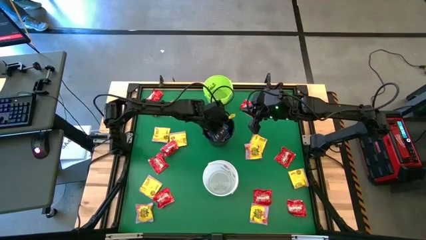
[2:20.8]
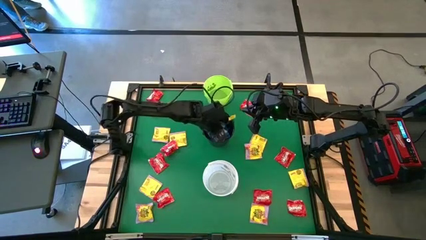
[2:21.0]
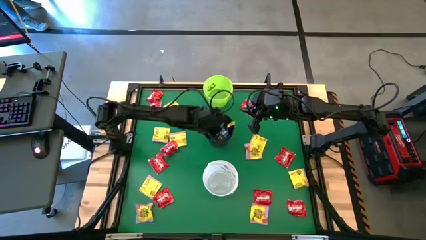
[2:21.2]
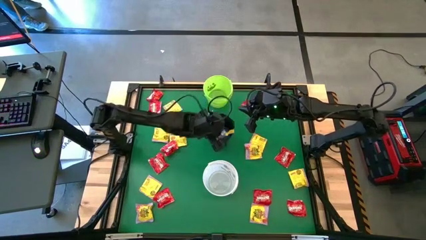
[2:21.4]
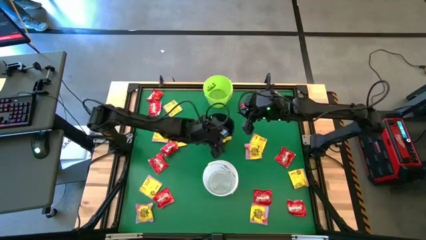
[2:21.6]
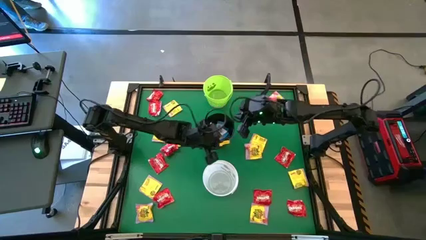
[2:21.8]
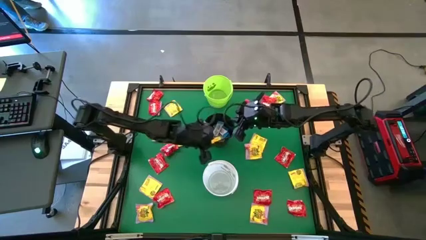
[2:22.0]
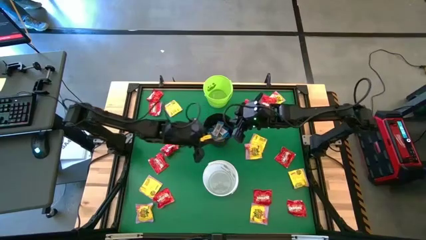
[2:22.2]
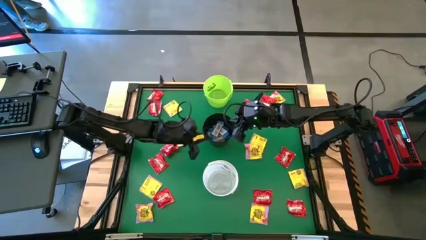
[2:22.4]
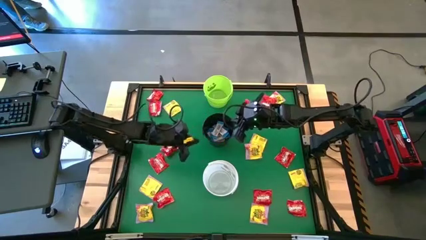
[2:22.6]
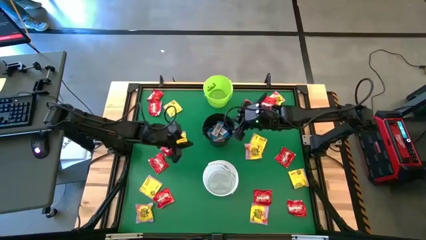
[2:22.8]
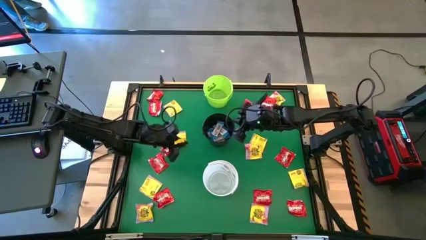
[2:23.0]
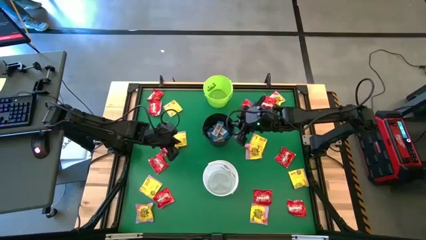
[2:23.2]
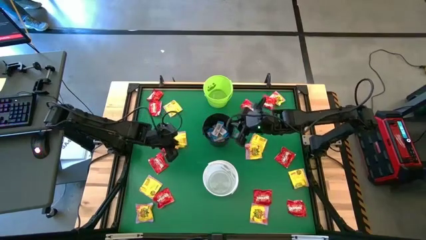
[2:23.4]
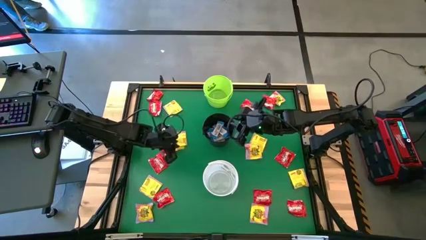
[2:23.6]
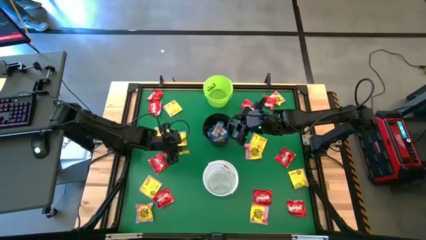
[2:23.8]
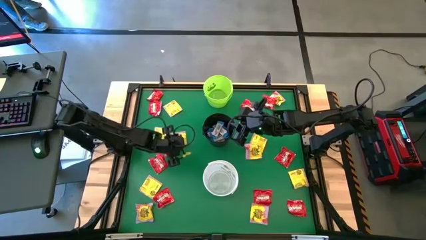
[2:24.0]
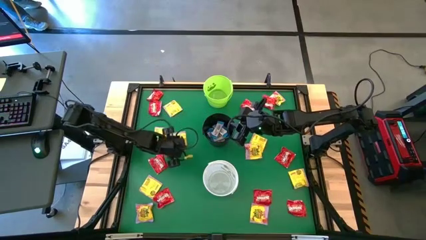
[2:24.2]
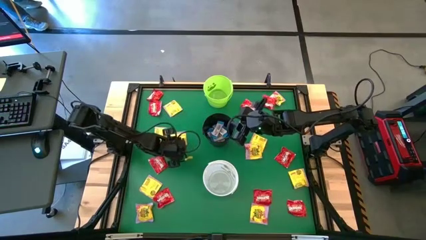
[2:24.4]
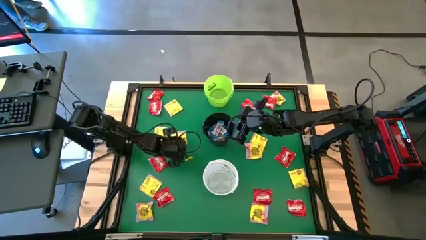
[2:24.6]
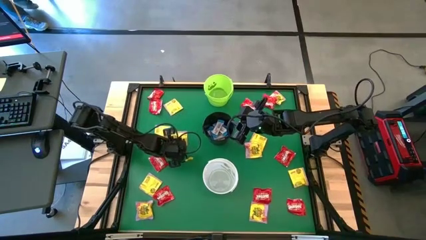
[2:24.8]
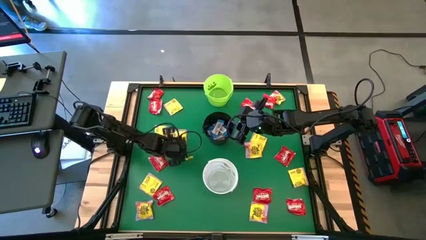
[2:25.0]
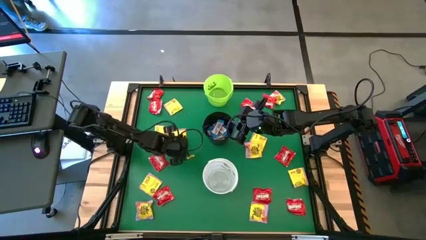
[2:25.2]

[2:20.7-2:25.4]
Task: Sort candy by brand, put in halloween buckets
Put the yellow candy into the white bucket

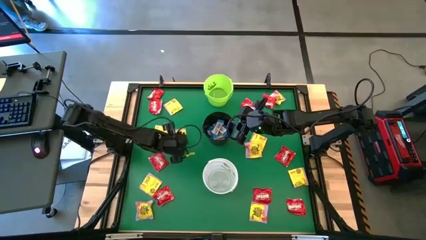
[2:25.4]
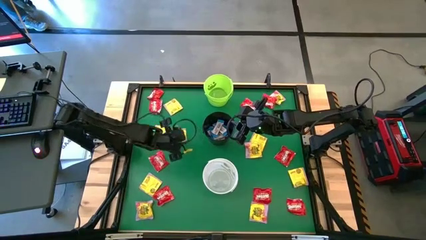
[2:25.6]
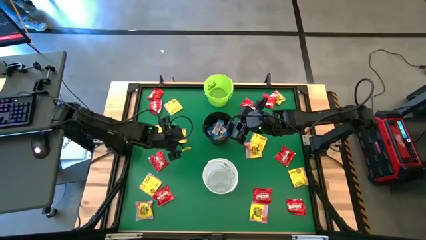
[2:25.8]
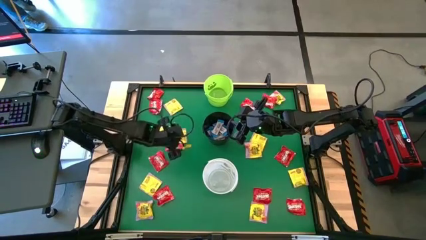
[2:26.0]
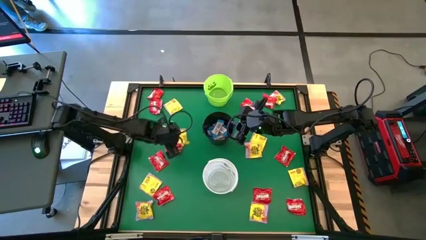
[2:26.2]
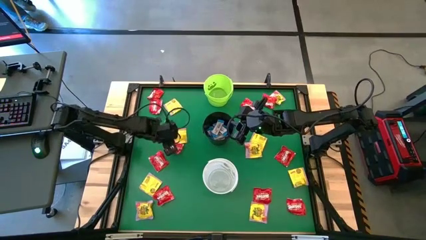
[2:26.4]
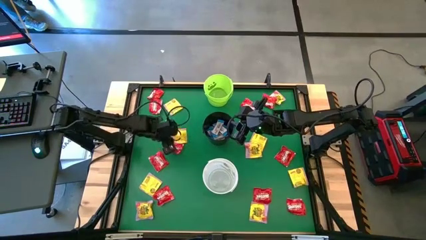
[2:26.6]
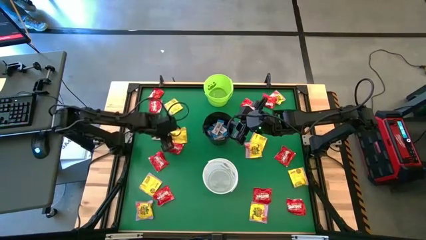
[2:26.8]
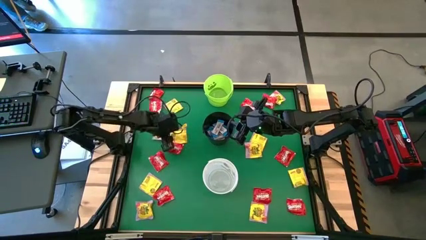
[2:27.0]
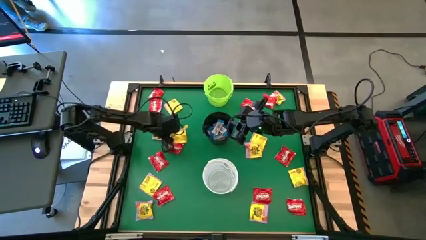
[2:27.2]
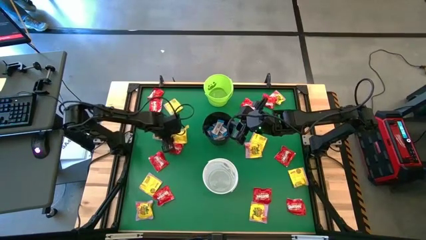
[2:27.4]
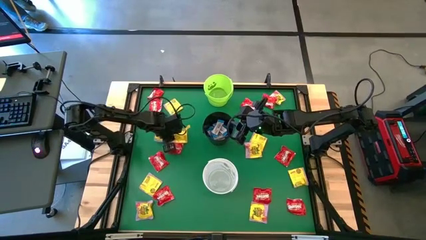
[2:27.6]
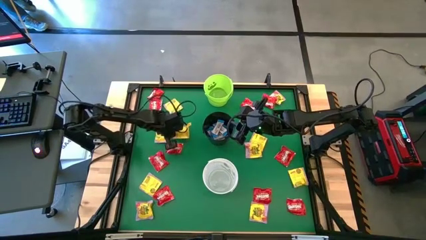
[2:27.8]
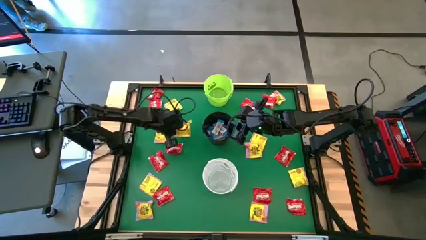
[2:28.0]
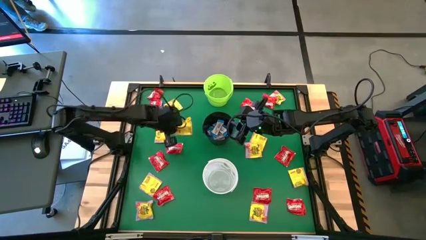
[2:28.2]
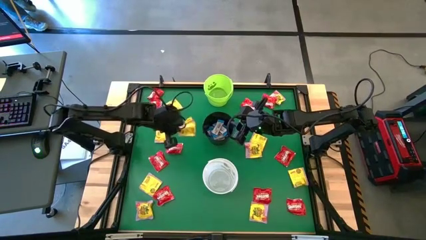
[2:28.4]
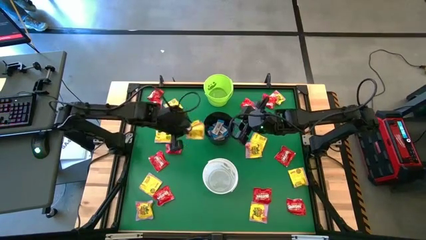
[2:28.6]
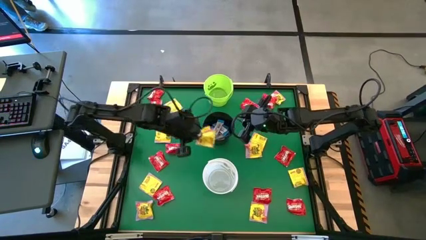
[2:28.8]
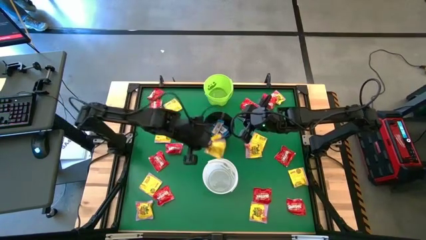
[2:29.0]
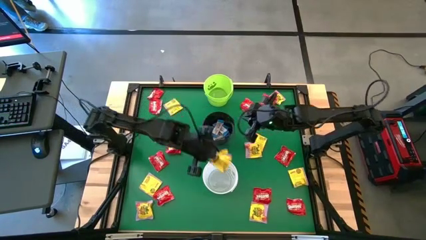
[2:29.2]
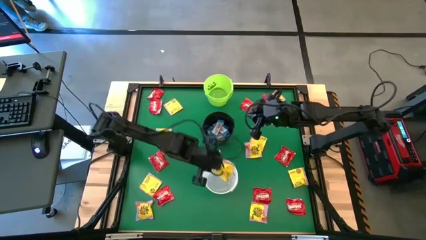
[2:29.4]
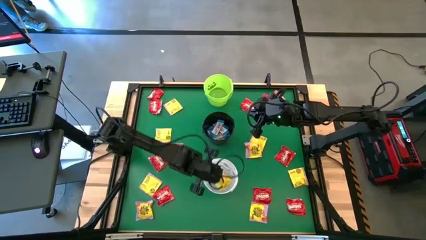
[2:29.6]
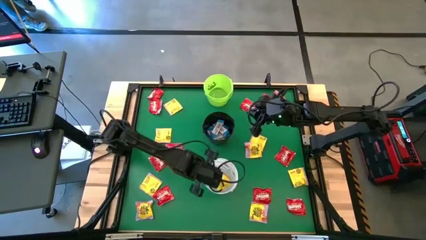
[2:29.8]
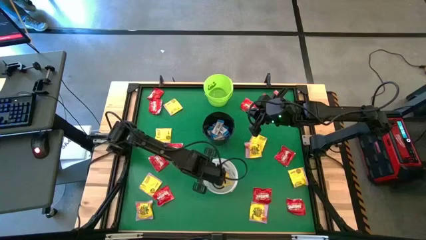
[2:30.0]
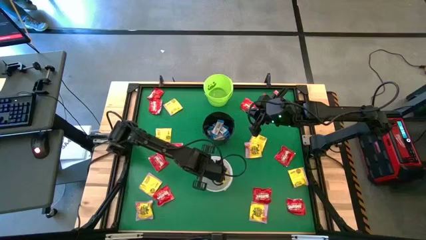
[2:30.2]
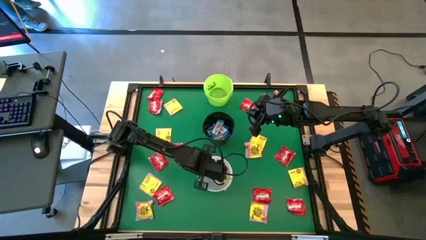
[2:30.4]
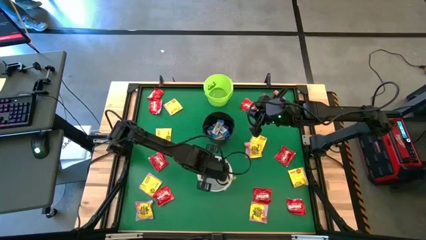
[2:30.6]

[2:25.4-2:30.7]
Put the yellow candy into the white bucket

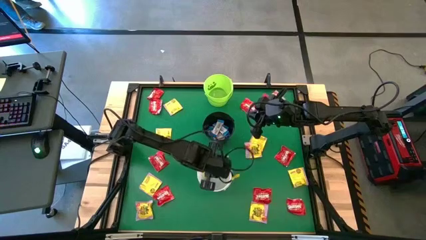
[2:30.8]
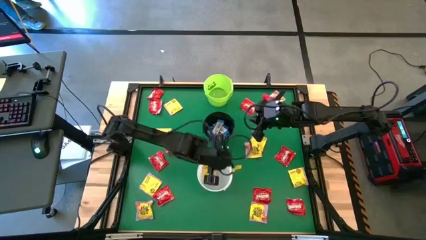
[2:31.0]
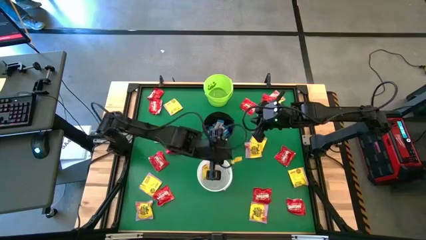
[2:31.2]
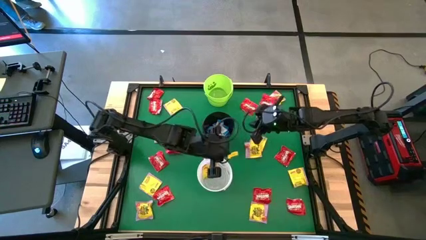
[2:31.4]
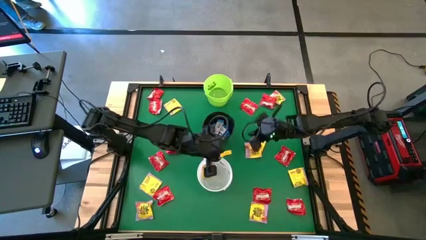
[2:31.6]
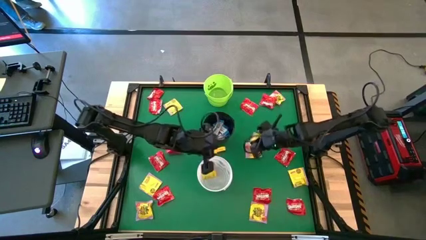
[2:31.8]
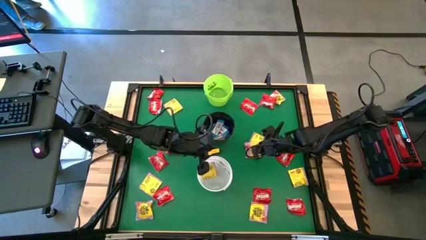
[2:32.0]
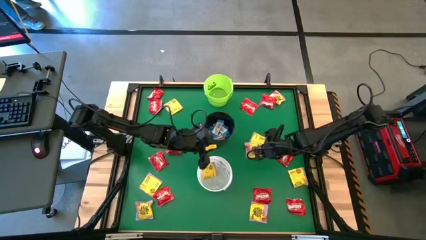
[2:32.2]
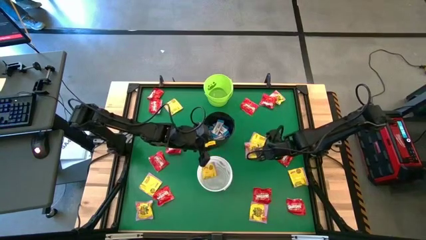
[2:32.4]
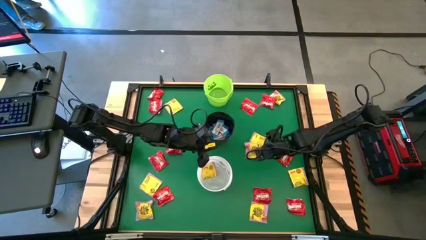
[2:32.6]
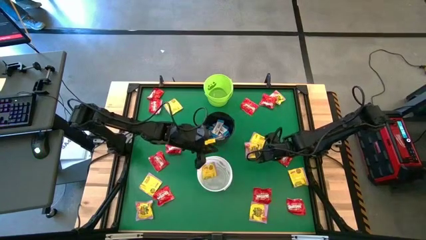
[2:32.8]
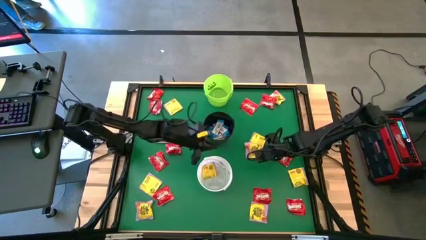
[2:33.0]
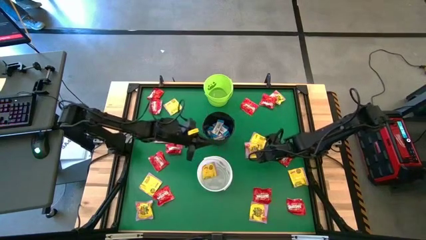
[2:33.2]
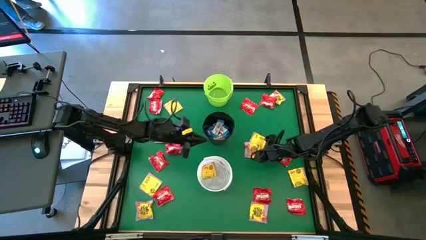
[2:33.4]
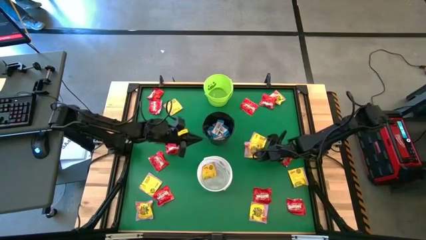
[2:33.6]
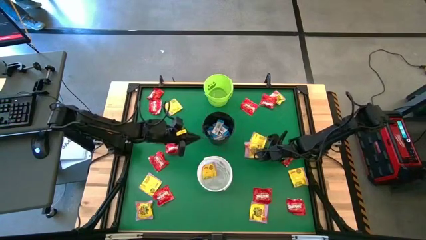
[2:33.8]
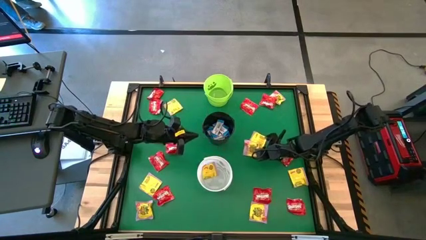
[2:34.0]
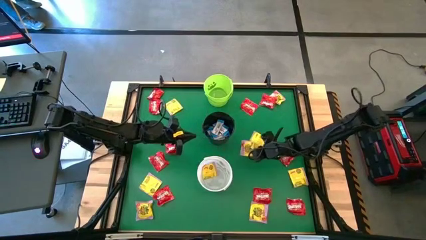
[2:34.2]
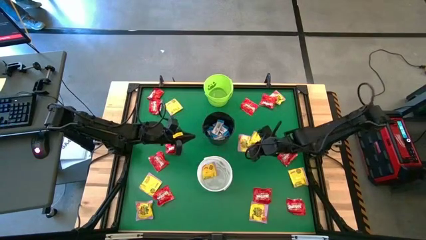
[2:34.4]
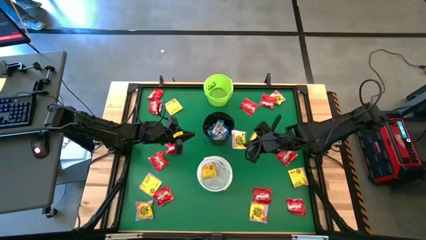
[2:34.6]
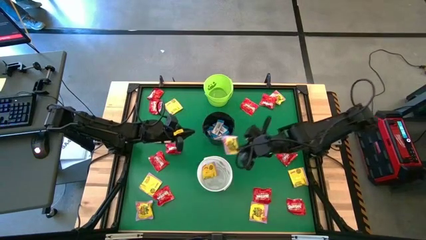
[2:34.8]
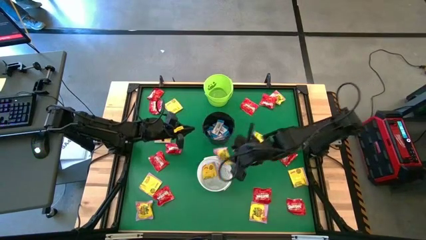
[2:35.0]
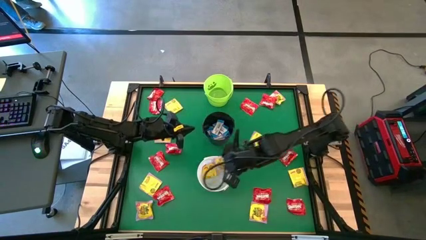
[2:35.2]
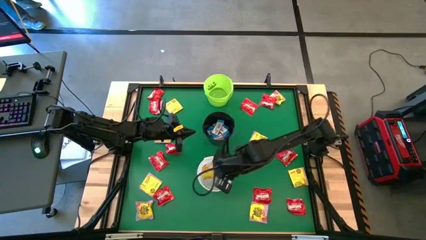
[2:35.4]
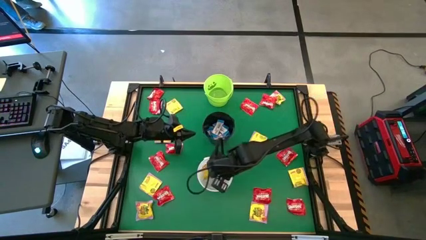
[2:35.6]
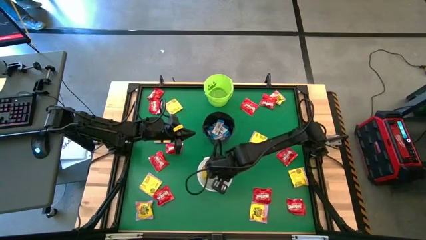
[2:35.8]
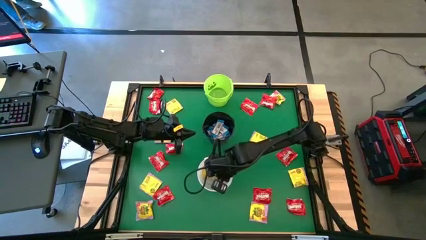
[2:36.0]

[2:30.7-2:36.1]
Put the yellow candy into the white bucket

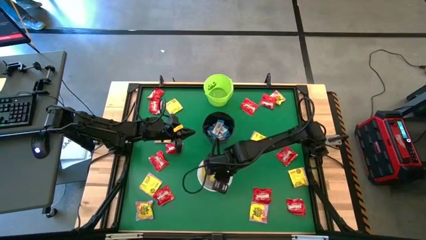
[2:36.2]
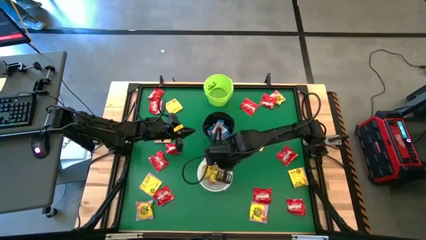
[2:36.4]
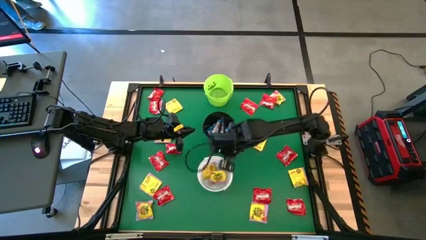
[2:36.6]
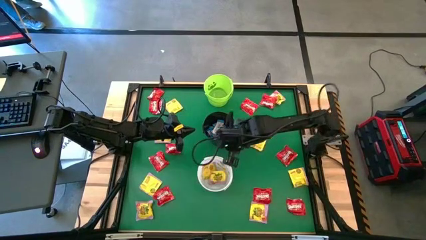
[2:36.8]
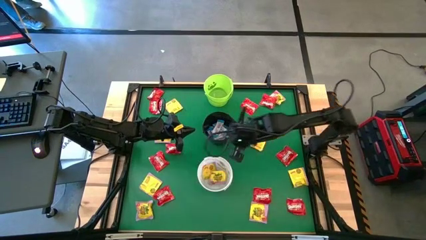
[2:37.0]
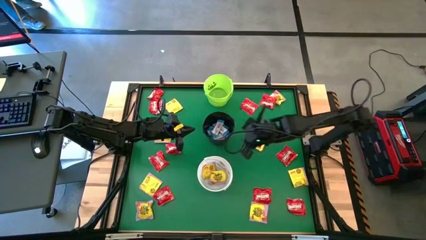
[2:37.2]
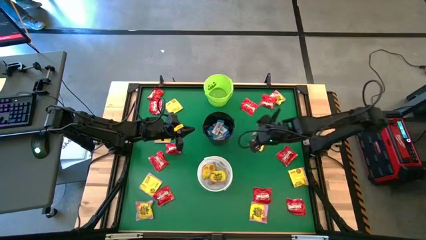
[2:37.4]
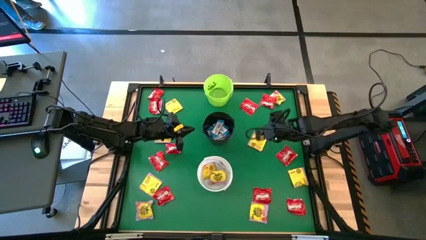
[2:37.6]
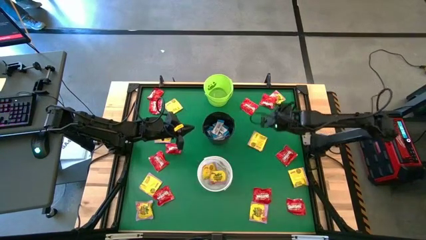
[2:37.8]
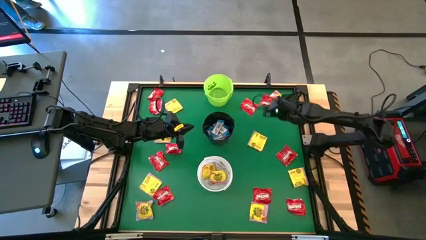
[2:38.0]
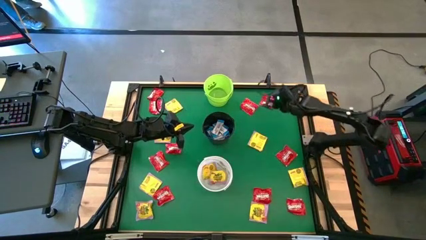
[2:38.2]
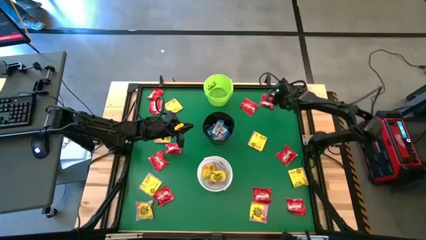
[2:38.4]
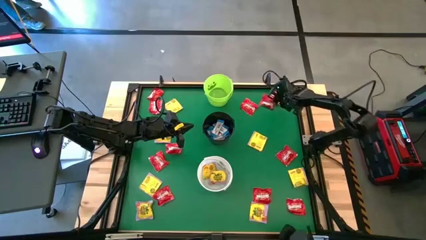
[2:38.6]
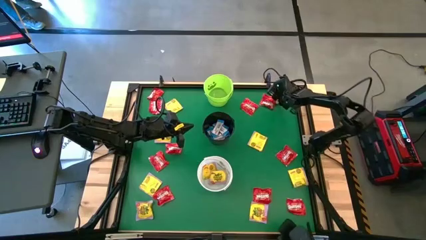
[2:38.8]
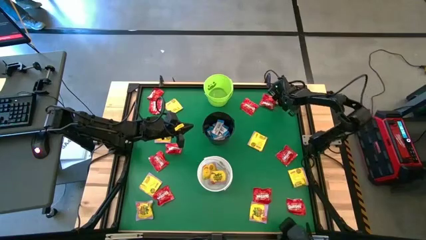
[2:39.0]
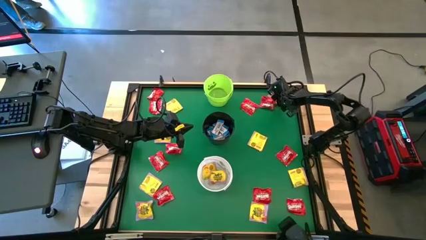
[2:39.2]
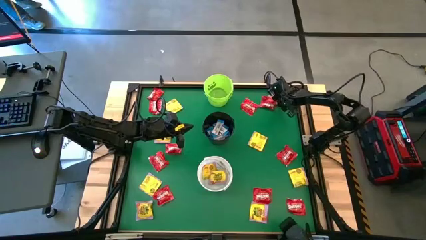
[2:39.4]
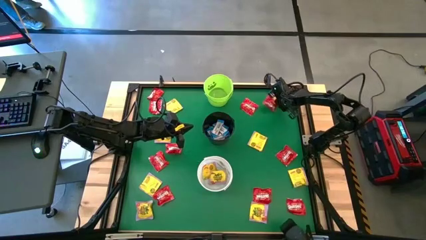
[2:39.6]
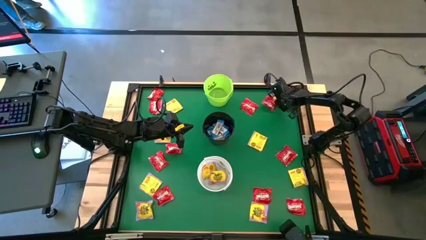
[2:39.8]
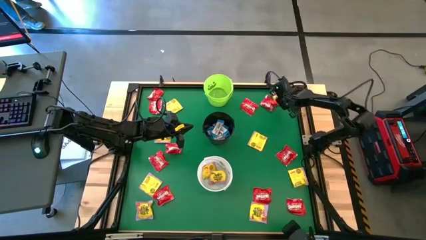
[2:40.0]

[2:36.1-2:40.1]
Put the yellow candy into the white bucket
